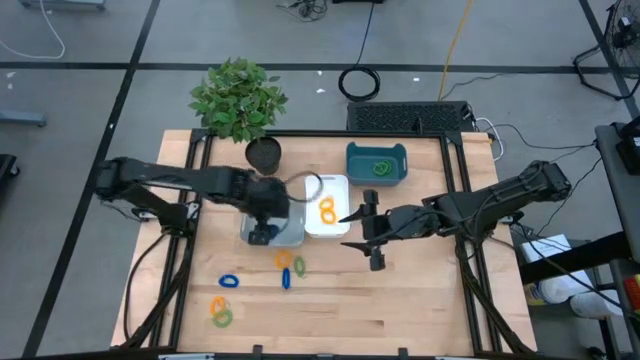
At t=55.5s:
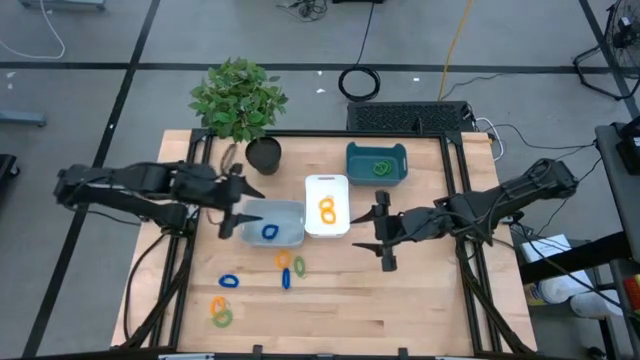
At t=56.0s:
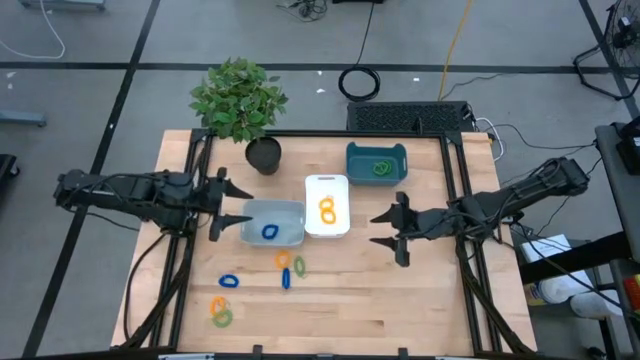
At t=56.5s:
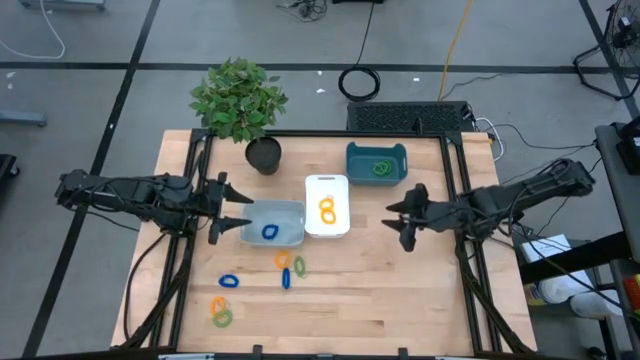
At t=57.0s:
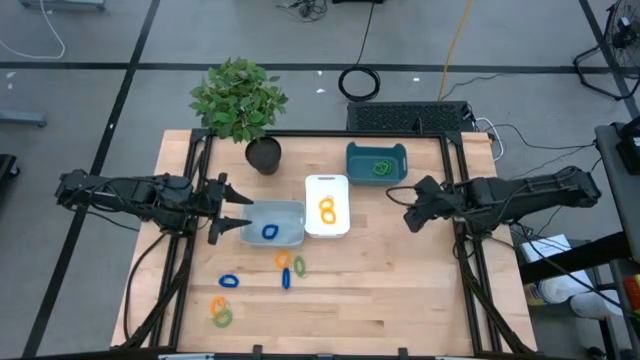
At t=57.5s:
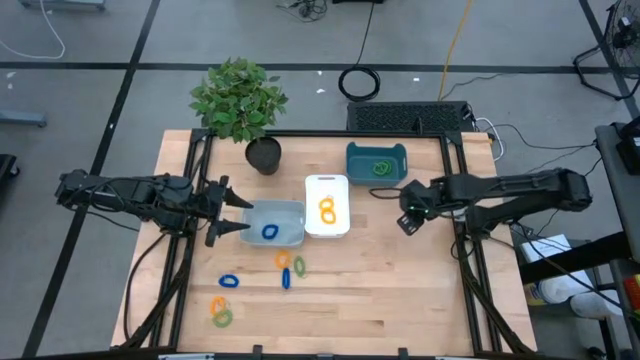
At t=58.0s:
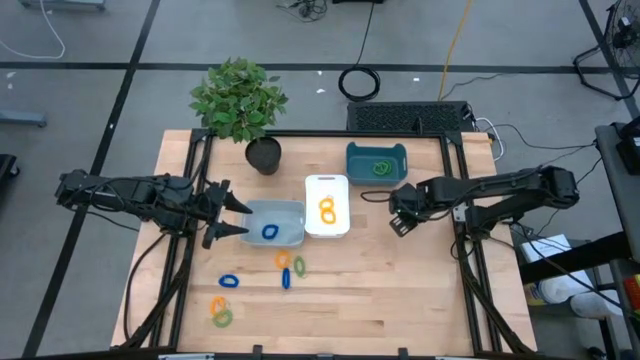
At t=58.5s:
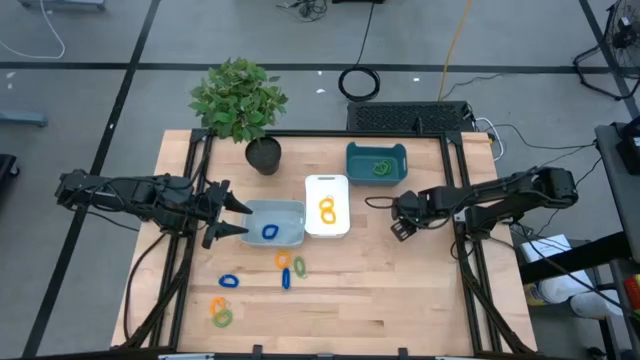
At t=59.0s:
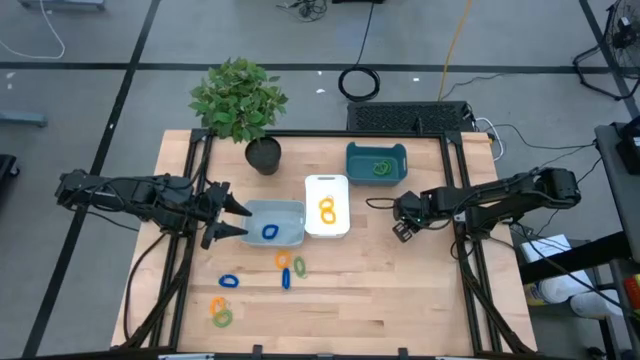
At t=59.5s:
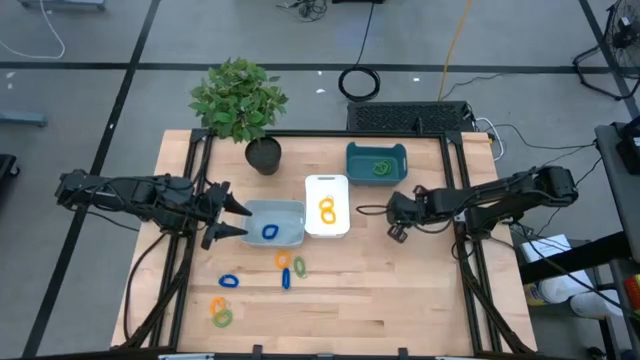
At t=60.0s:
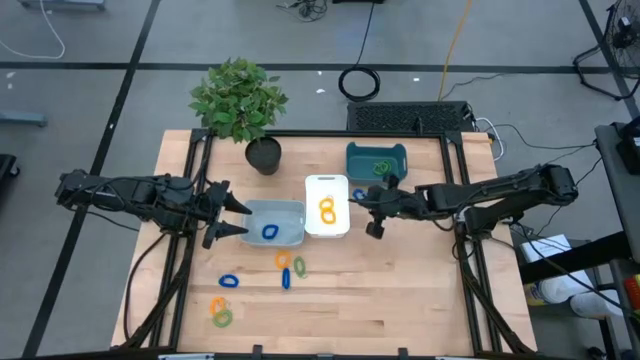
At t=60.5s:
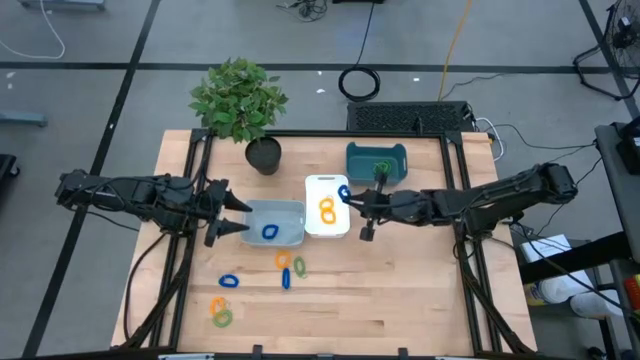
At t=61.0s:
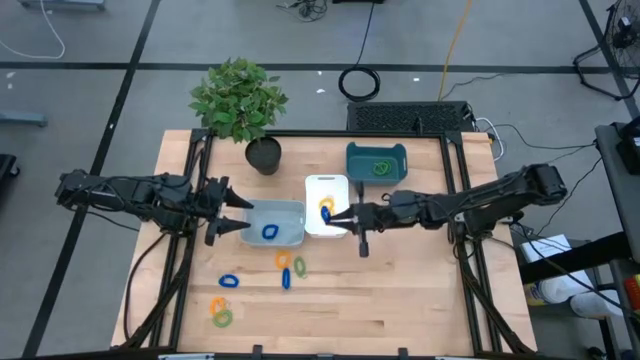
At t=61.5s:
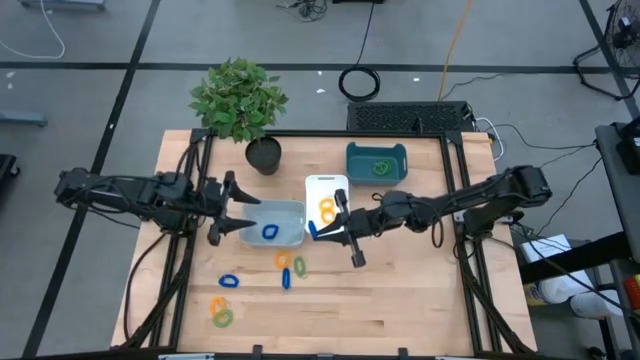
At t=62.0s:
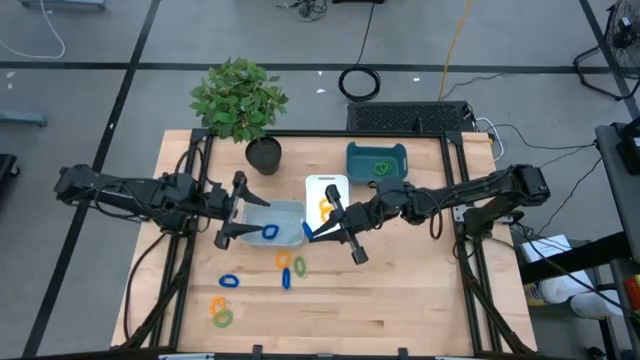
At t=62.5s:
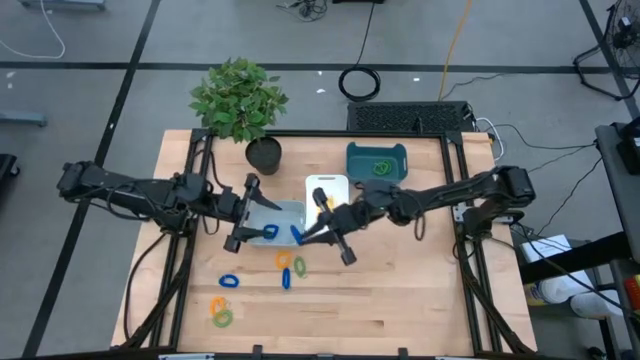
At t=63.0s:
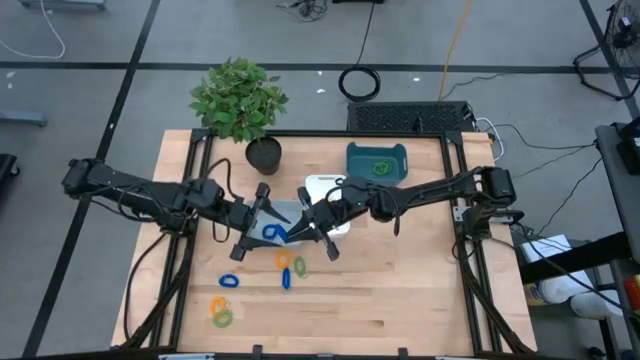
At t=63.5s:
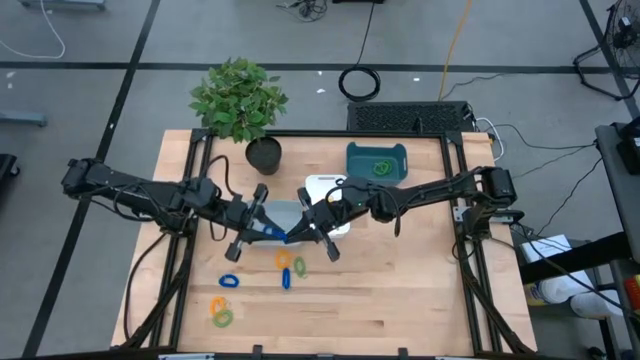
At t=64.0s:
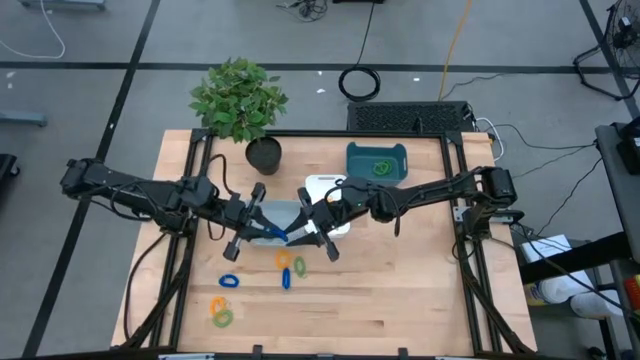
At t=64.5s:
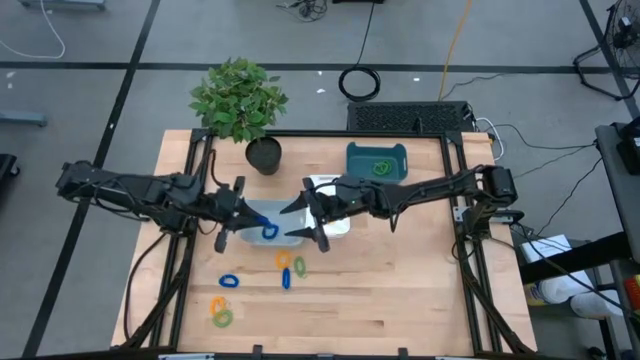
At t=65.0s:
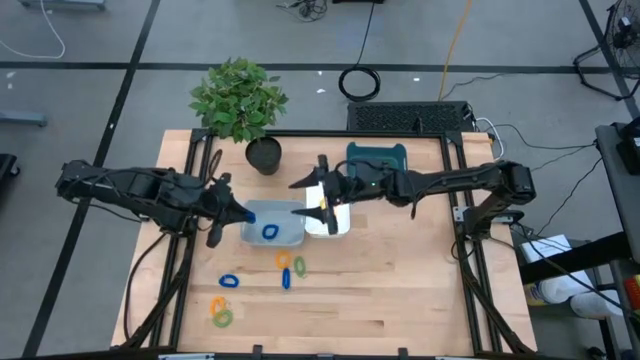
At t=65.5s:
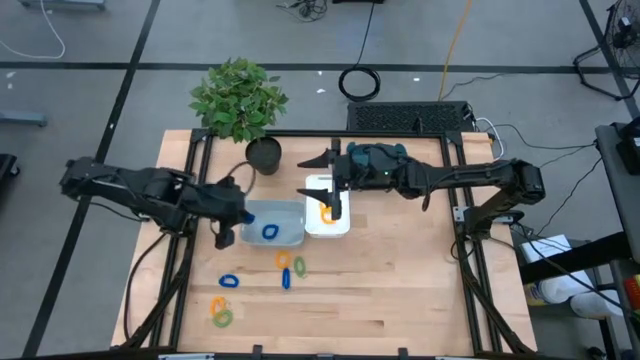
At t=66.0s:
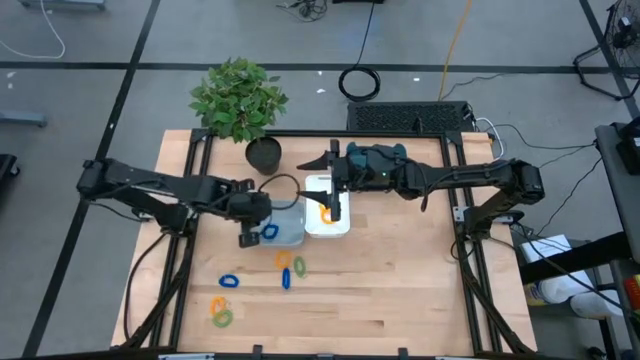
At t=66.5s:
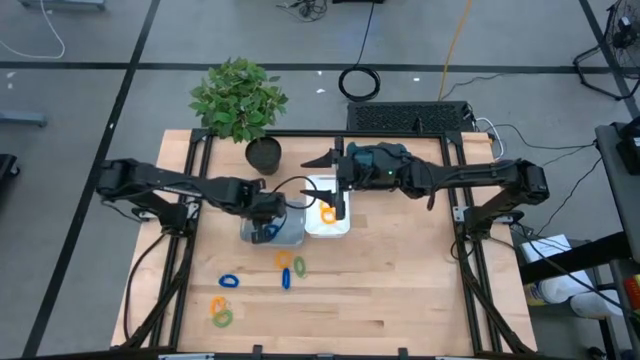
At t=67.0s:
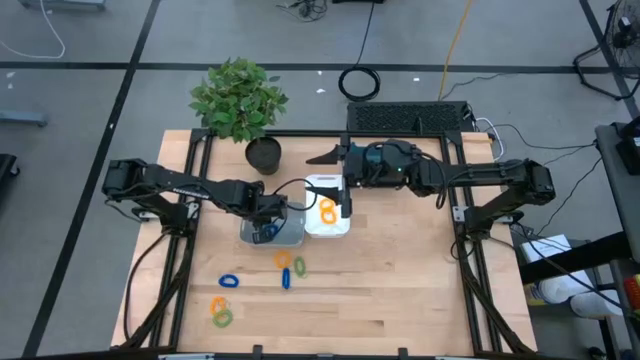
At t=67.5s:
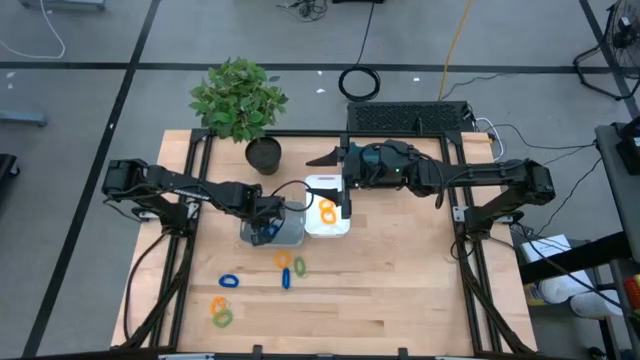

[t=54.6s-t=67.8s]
Task: Sort spring keychains
Put the blue spring keychain into the gray bin
